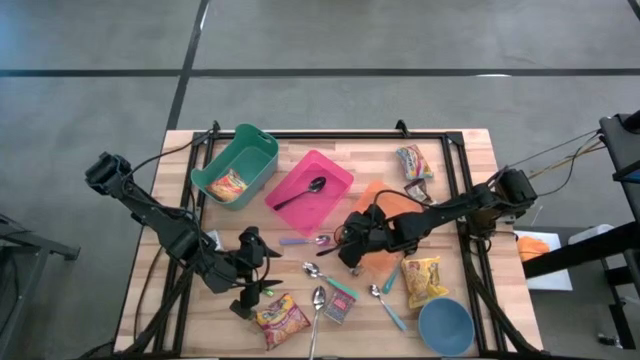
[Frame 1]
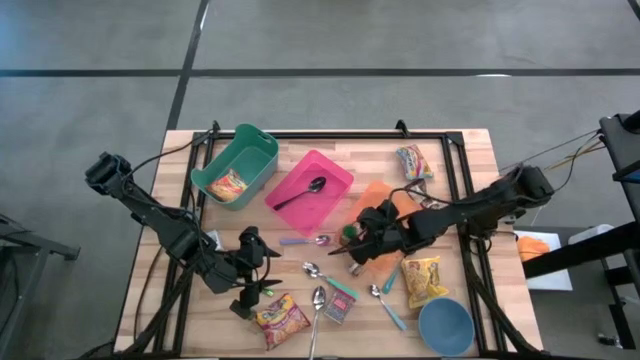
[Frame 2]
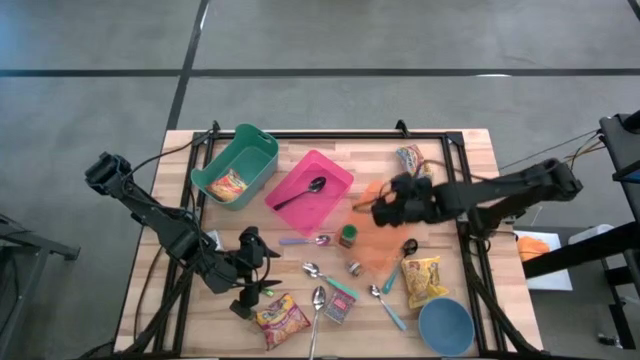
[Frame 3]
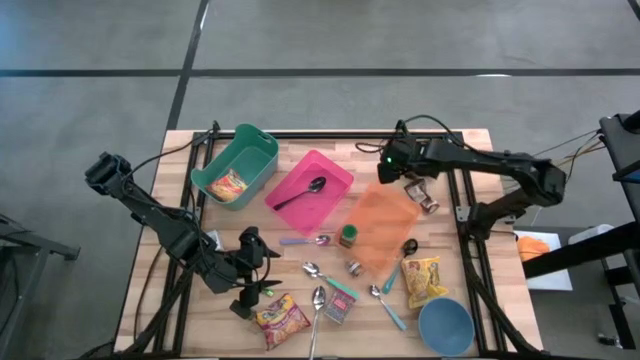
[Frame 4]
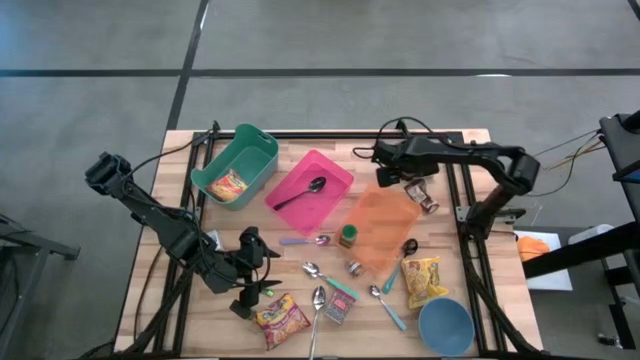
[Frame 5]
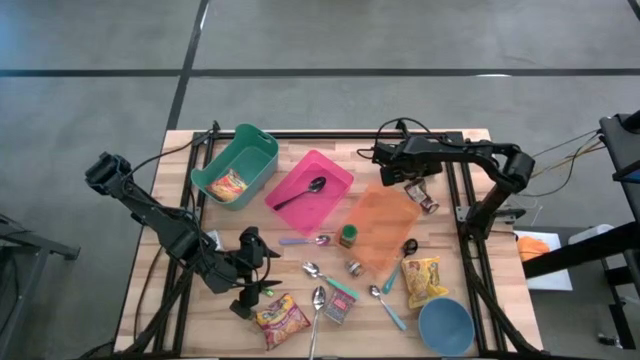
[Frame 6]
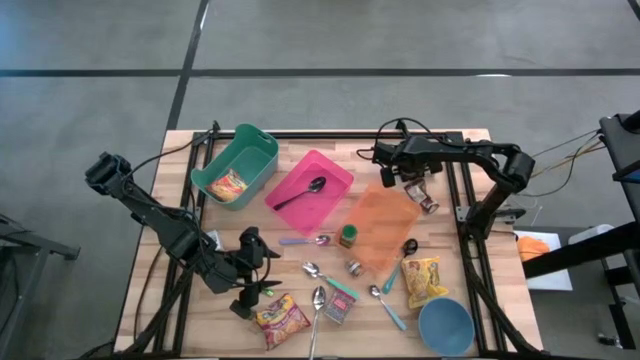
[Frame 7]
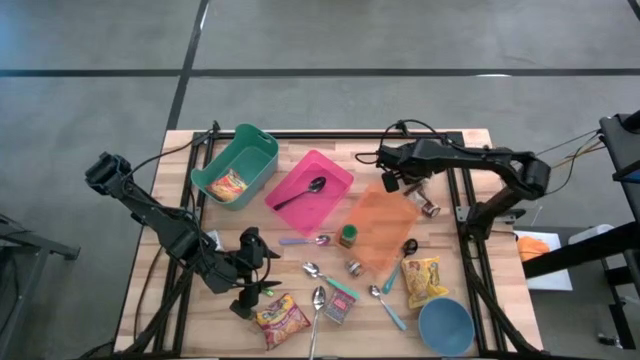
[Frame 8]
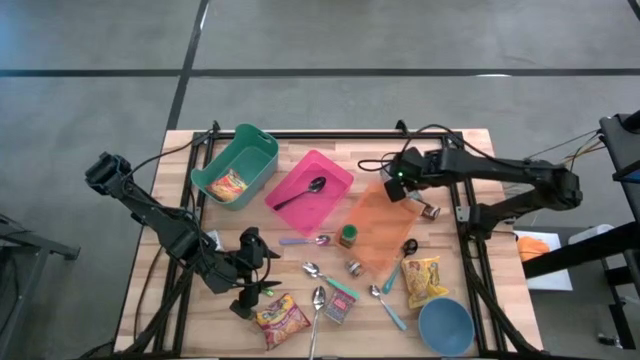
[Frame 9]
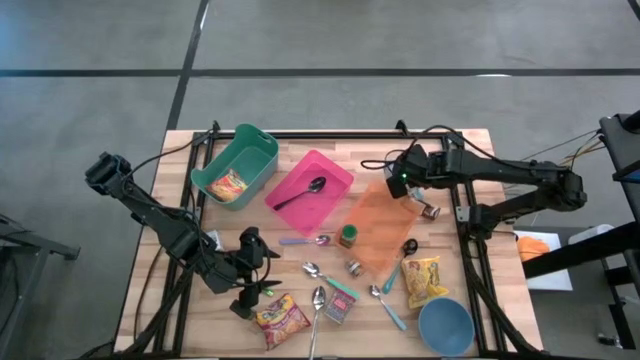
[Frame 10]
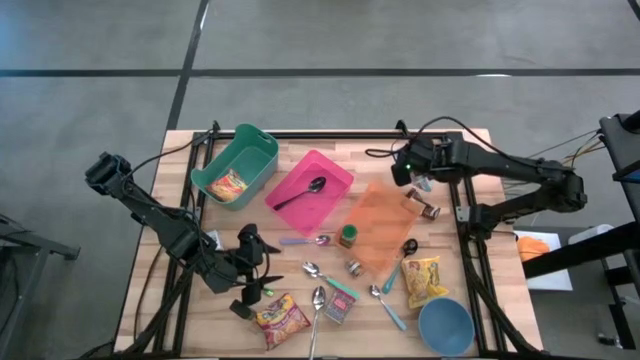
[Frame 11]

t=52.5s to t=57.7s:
Put the blue noodle pack into the green bin

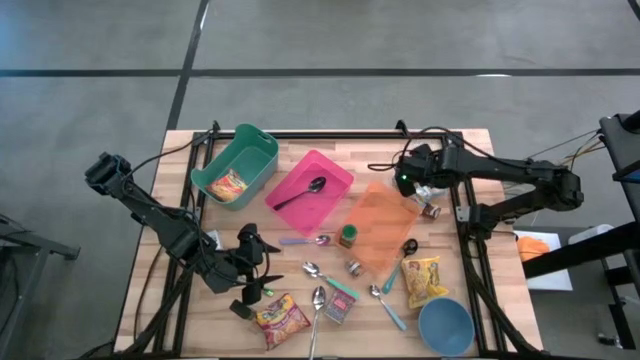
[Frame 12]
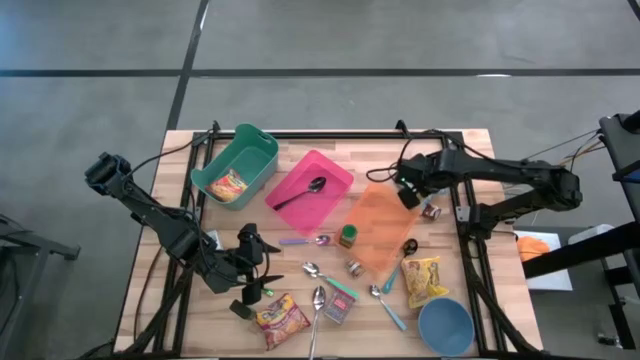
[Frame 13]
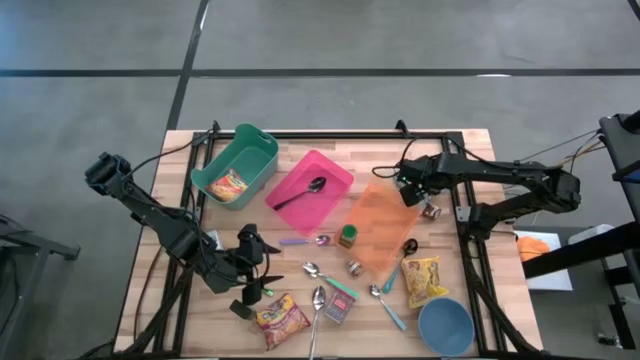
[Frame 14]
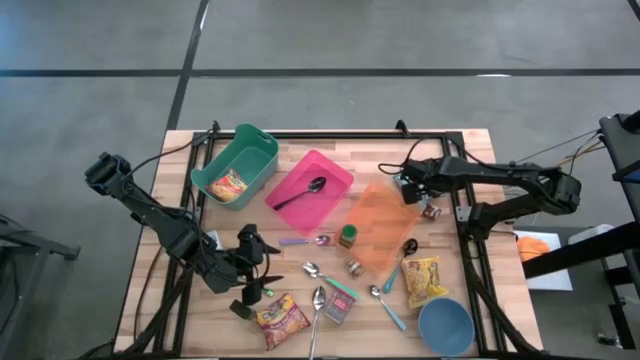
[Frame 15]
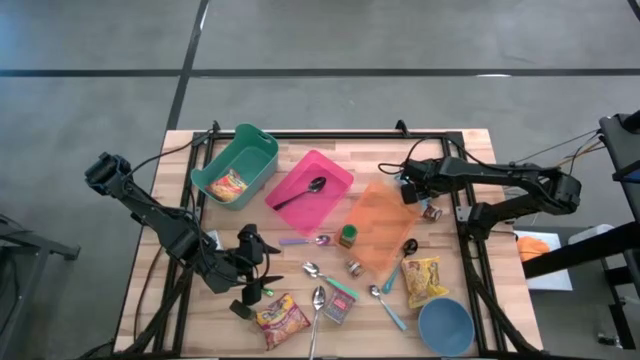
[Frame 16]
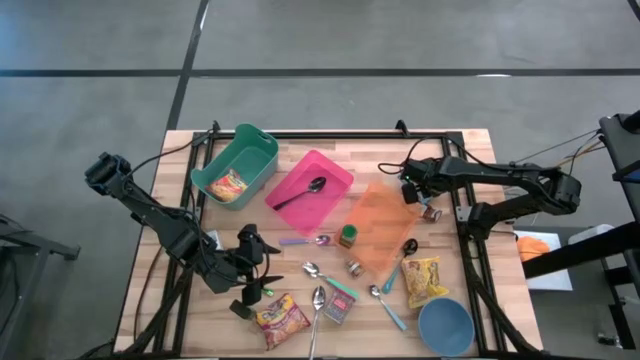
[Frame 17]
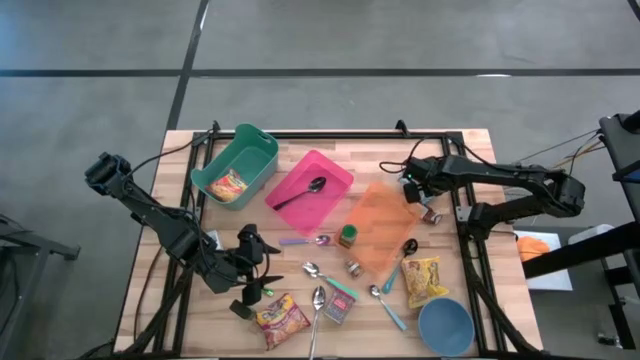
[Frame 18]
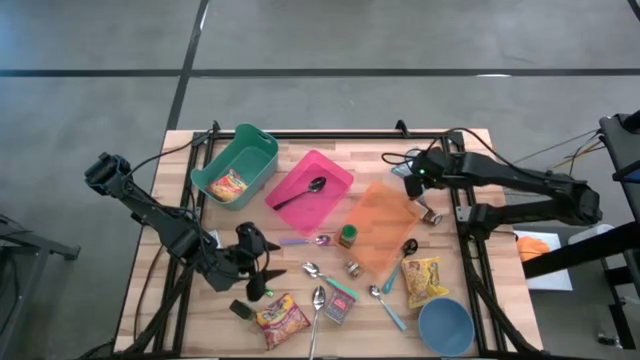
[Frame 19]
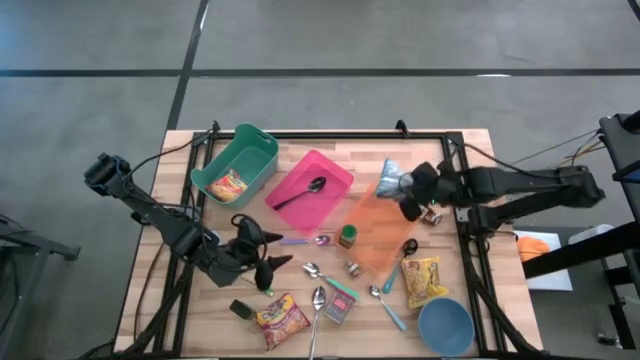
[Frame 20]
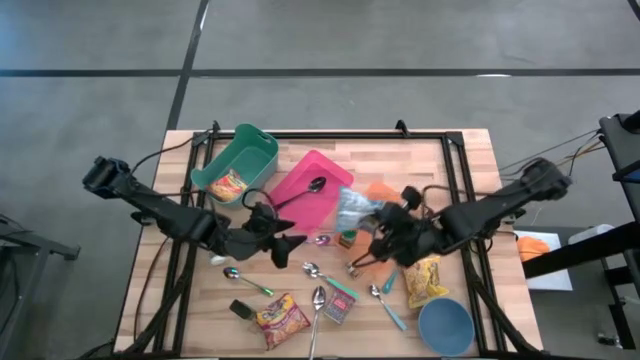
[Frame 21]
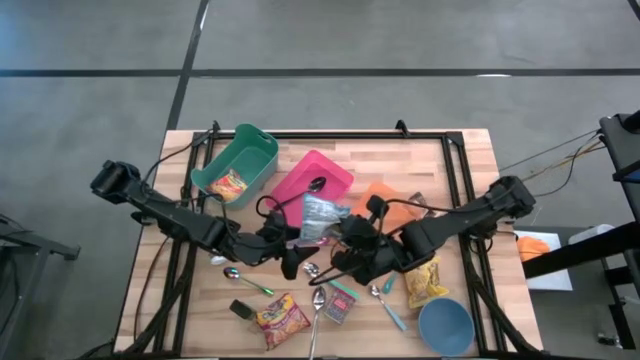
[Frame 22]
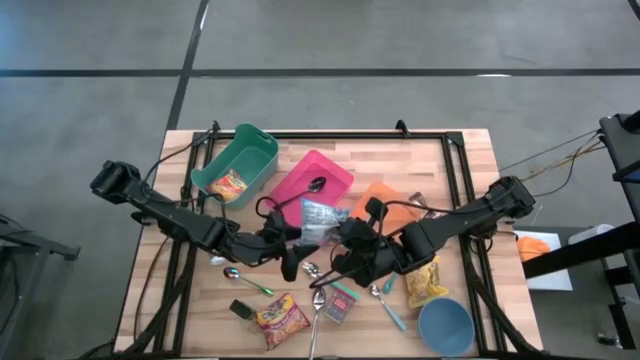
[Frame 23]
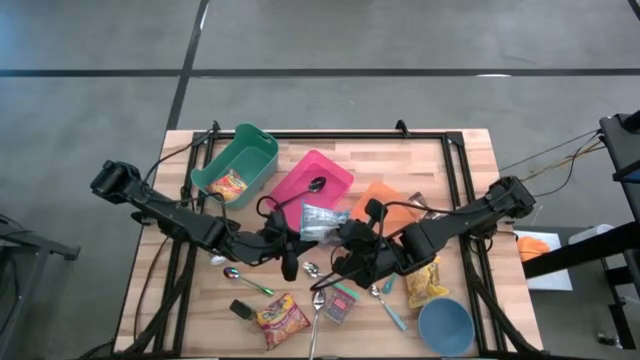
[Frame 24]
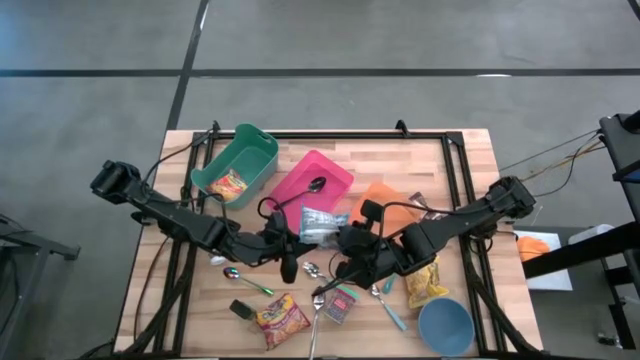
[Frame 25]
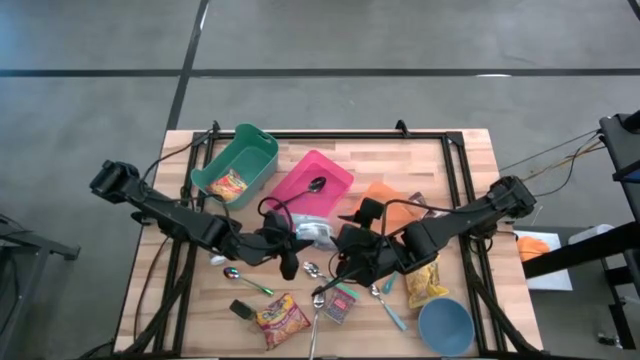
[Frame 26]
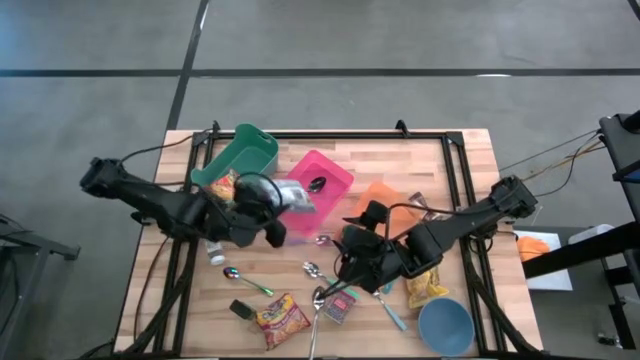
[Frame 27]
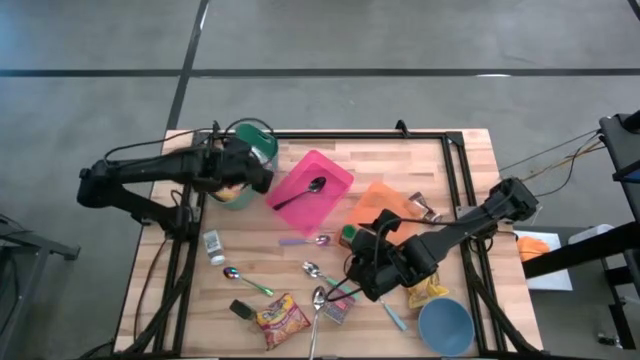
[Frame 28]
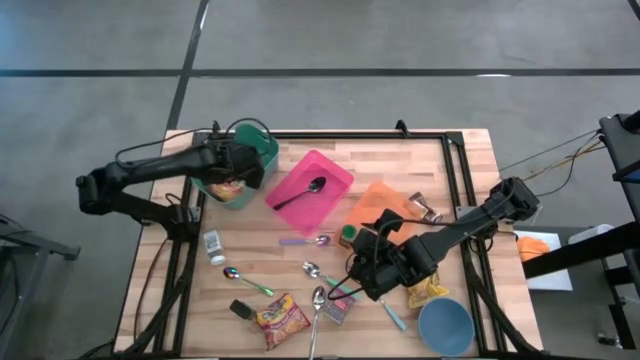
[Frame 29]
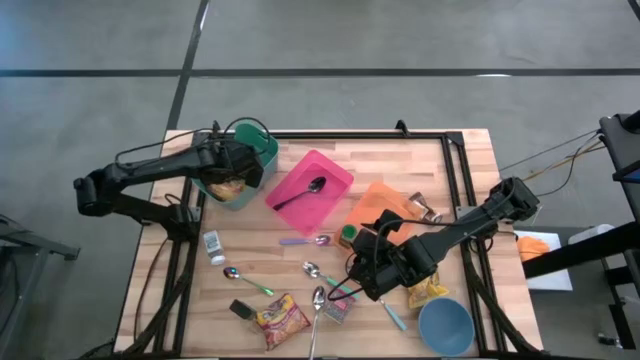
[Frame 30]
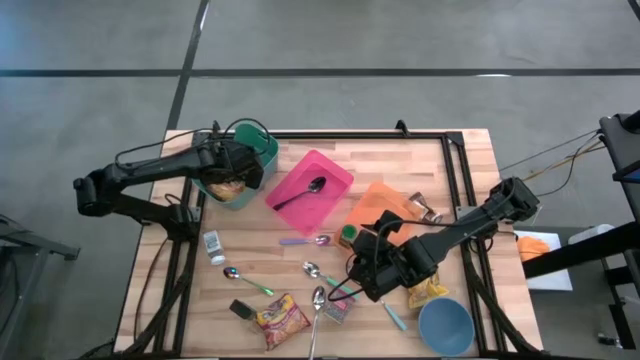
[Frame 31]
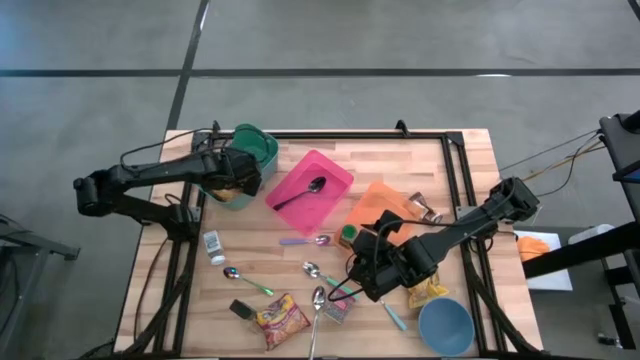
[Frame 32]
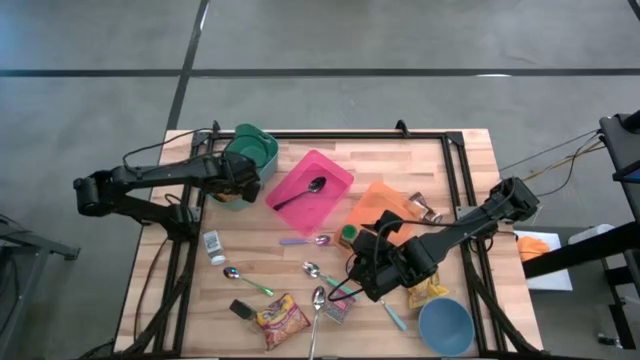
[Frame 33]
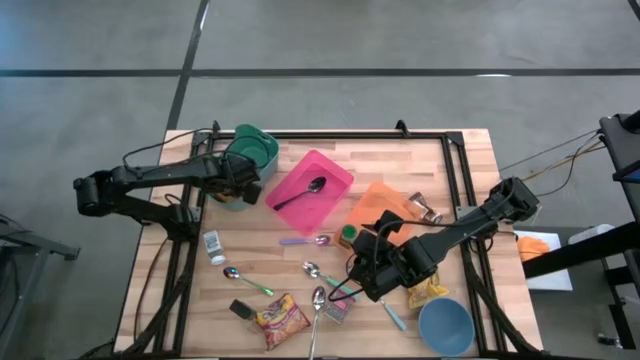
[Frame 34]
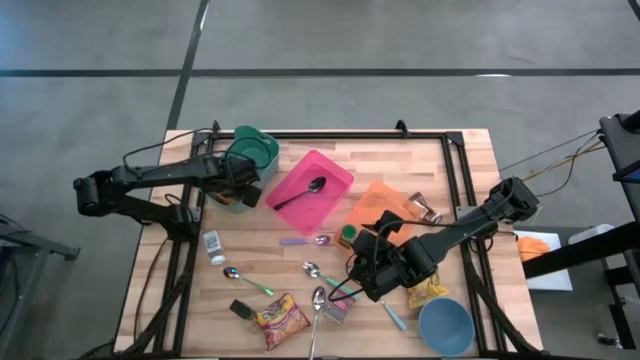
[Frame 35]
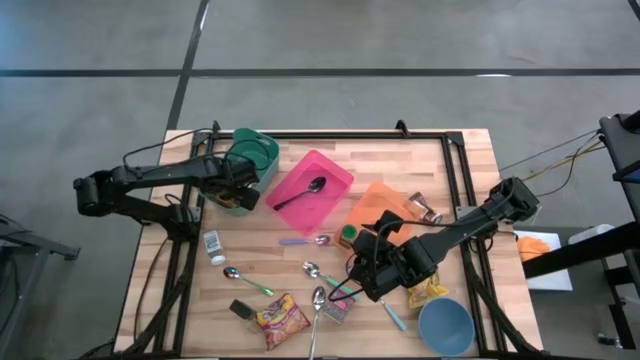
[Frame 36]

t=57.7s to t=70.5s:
Put the blue noodle pack into the green bin

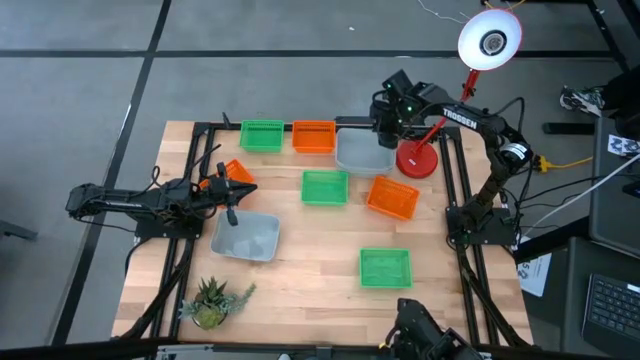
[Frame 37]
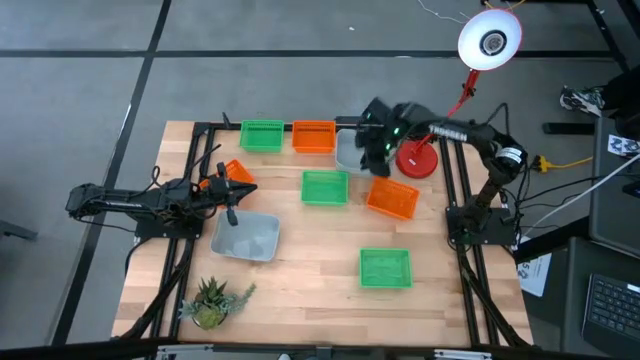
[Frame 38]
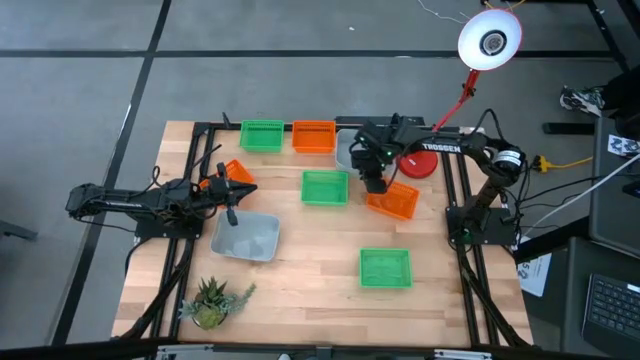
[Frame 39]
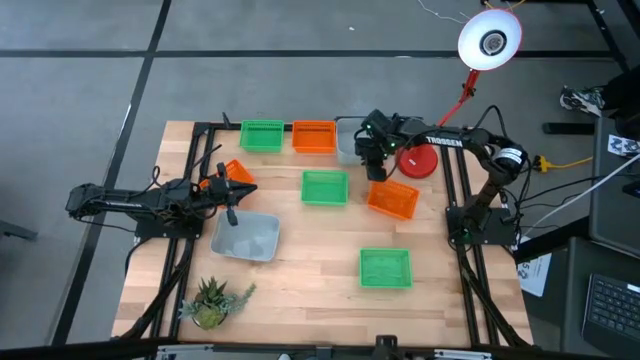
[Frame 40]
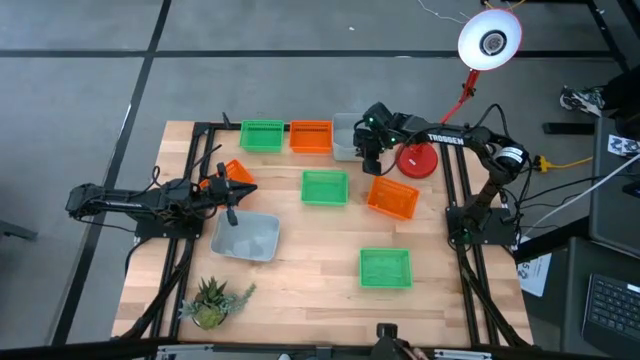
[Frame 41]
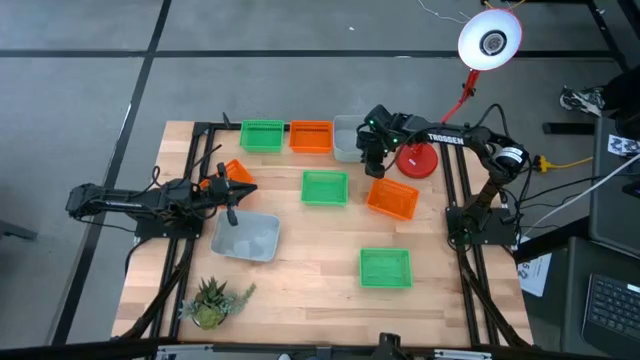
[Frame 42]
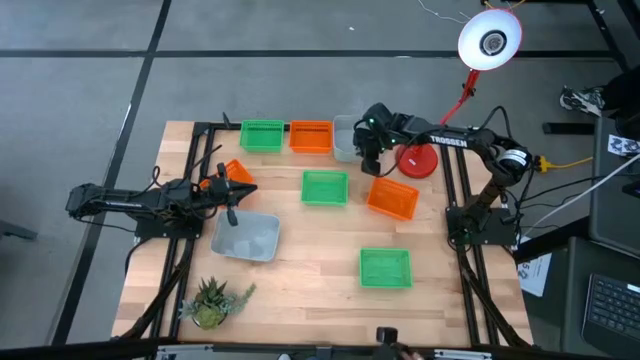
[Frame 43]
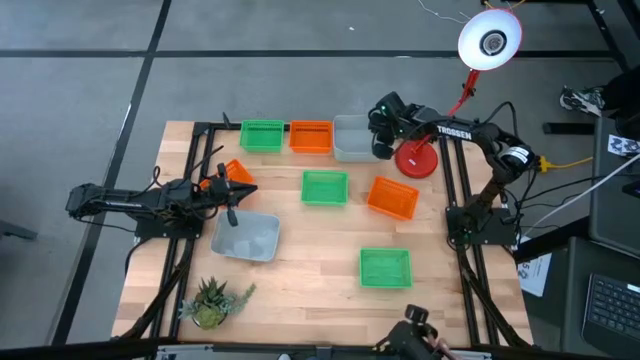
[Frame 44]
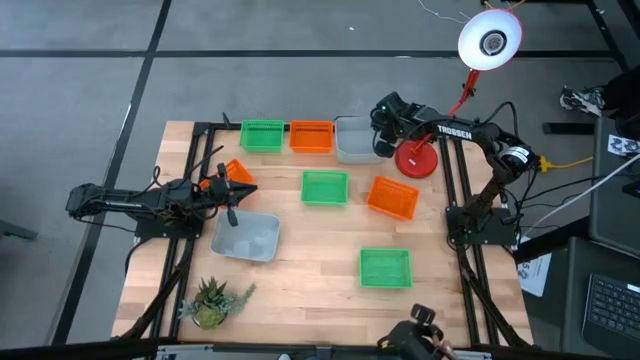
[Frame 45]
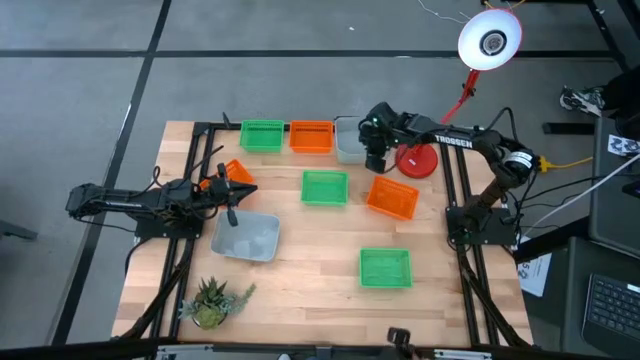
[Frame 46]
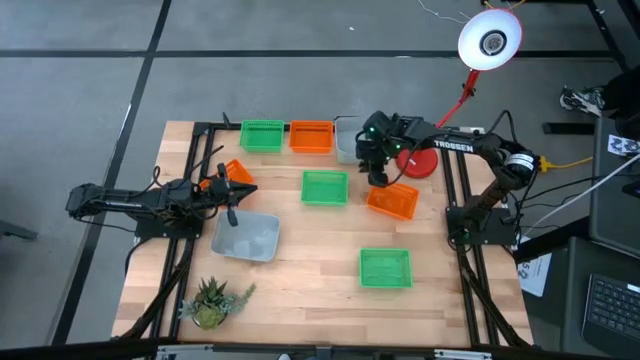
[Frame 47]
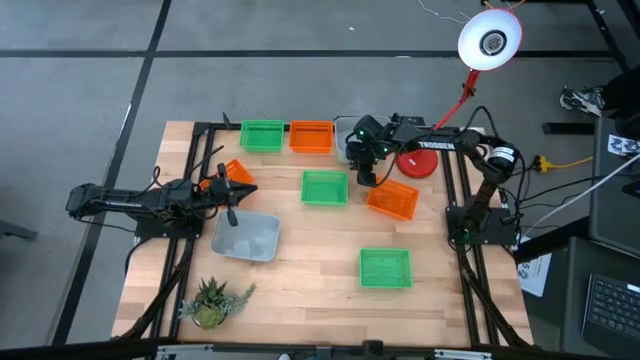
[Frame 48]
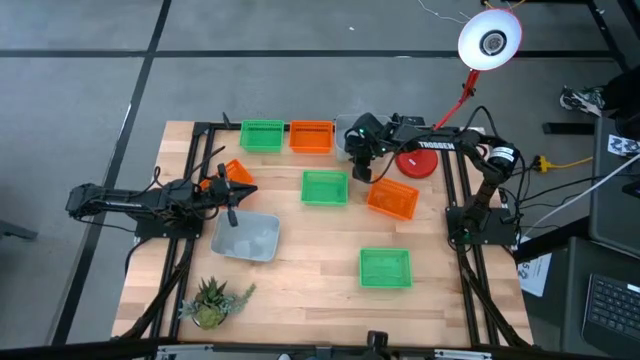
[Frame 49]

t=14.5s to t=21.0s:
Adjust the top gray bin on the table
